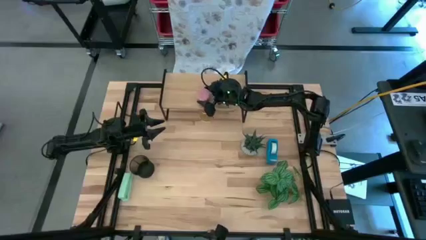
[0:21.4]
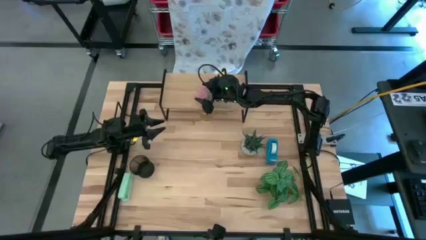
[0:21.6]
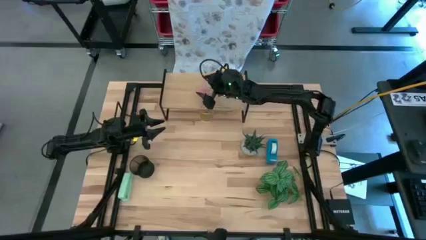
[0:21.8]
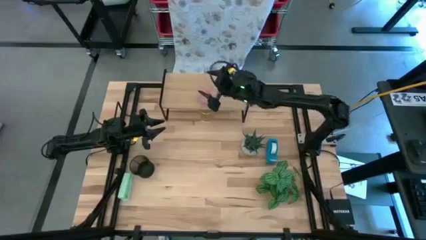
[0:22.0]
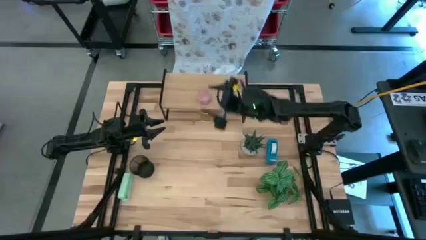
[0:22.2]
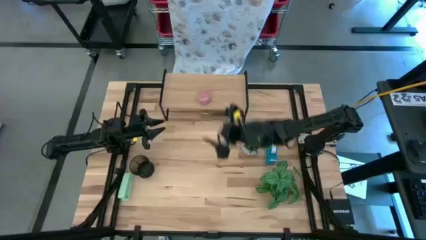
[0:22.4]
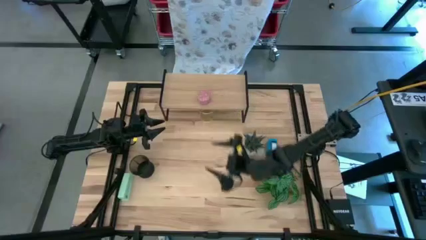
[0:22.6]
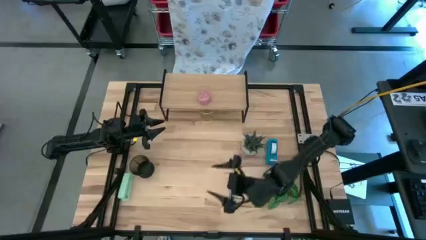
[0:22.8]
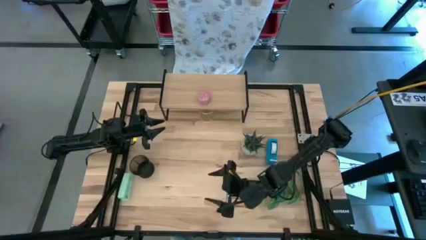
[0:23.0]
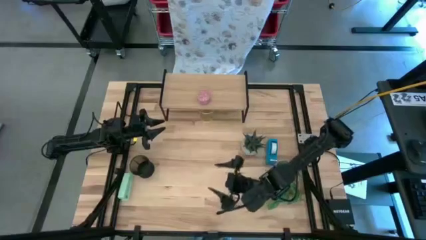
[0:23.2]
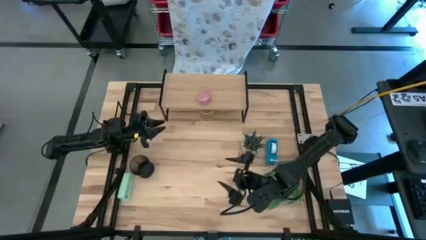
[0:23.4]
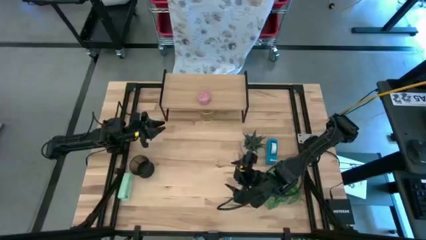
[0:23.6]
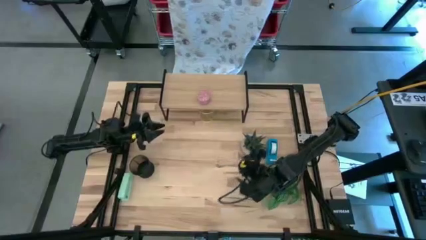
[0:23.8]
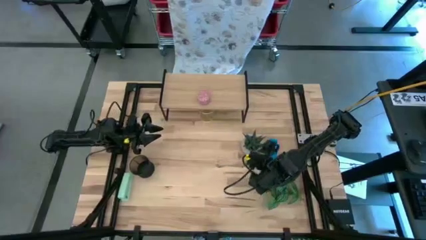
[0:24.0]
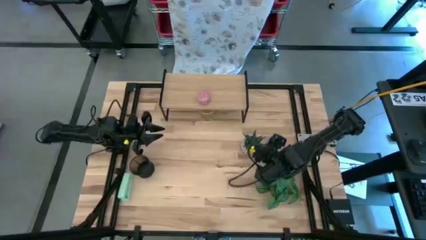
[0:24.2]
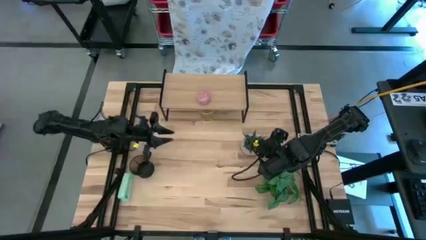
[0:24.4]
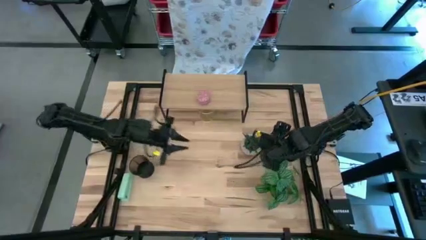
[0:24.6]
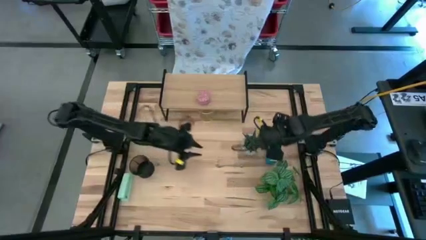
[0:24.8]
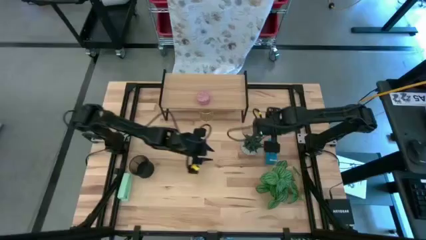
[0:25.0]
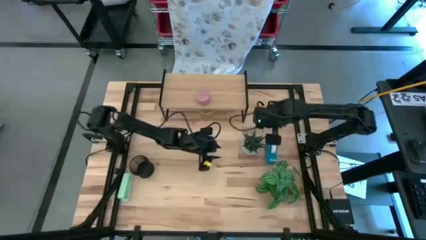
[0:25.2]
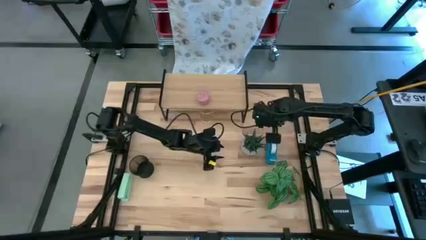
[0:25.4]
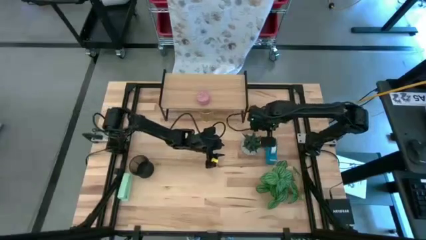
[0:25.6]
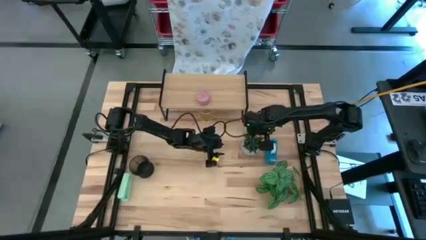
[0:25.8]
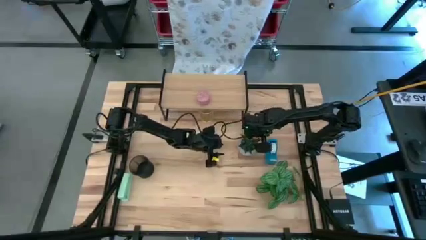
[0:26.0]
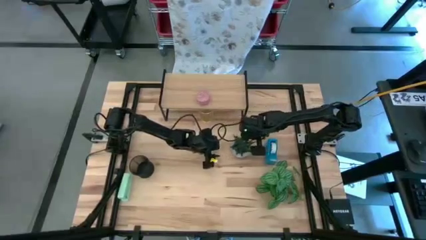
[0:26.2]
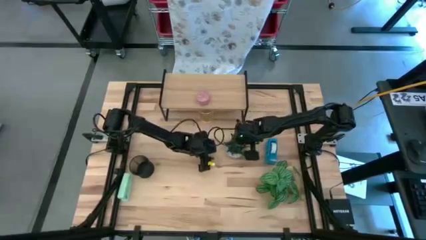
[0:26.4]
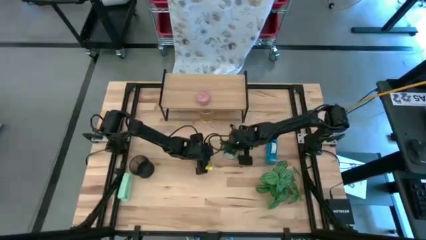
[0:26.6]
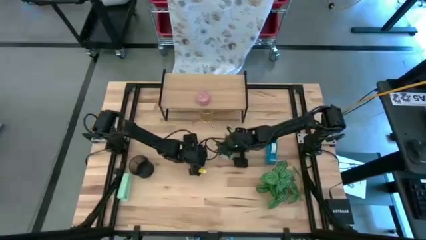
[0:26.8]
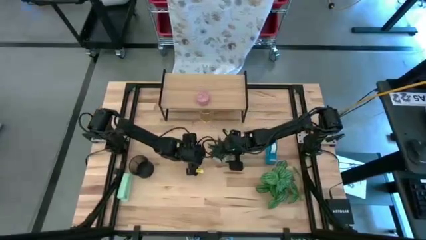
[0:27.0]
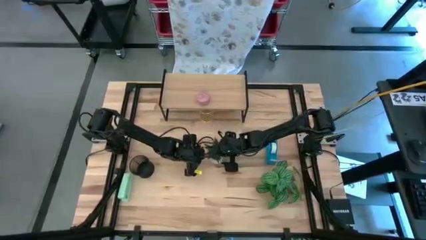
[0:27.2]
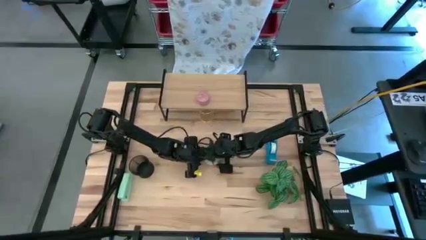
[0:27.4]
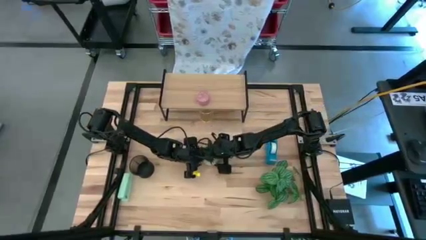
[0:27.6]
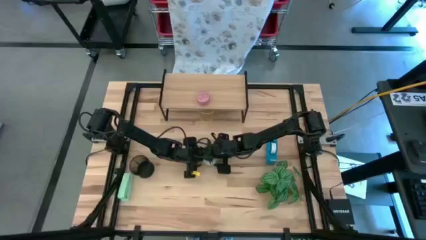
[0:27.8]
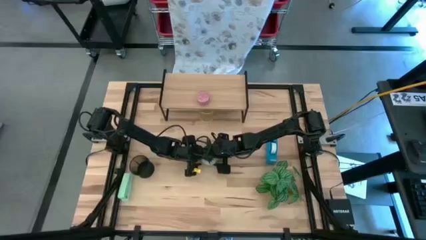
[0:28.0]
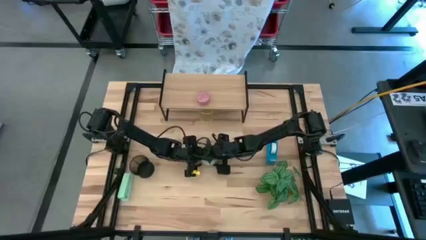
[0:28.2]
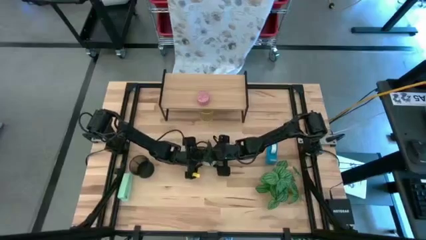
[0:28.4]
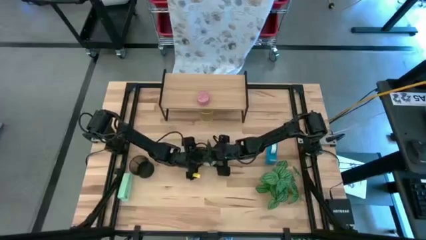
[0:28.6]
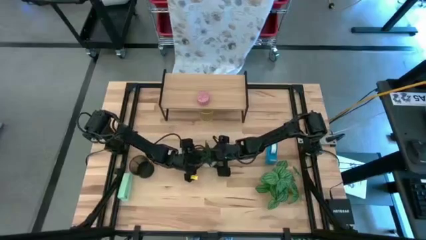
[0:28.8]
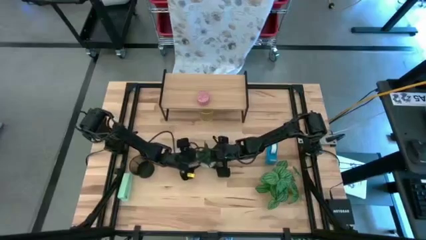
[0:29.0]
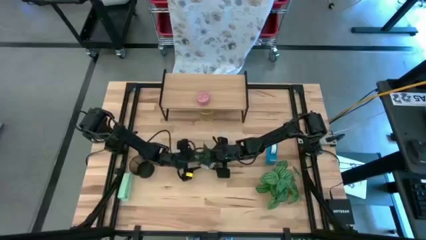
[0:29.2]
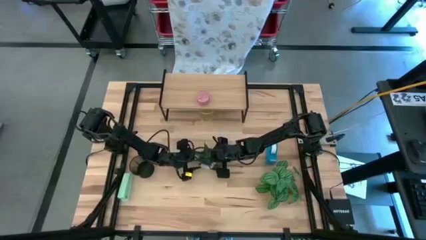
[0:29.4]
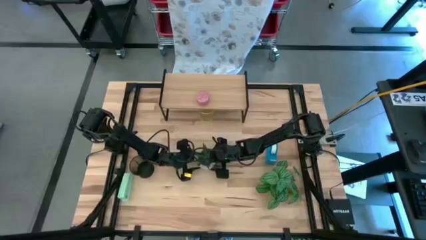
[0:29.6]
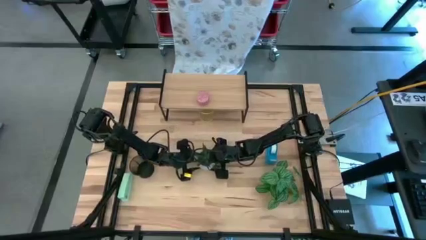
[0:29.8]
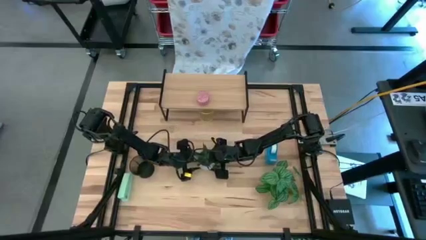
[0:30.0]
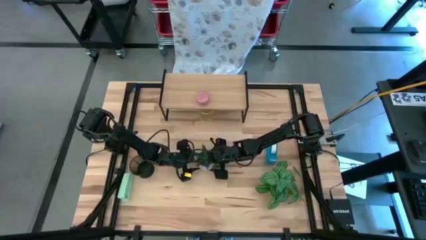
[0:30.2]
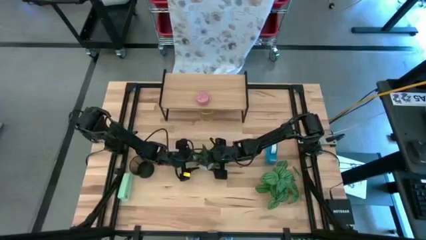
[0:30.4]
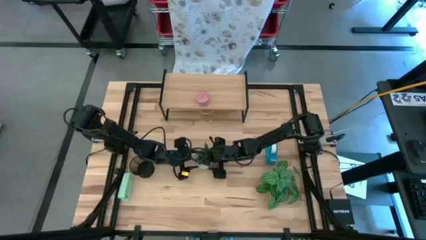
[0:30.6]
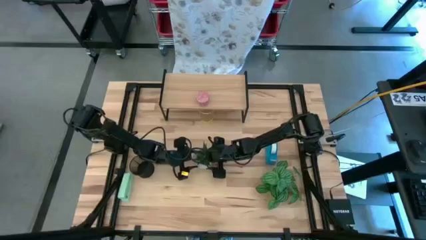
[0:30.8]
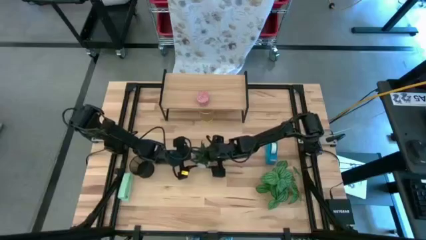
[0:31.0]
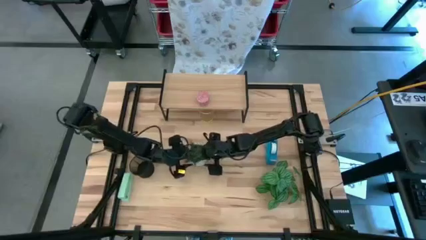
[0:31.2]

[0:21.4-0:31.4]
Task: Stock shelves
Put the top potted plant on the shelf

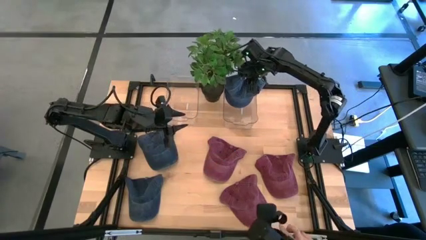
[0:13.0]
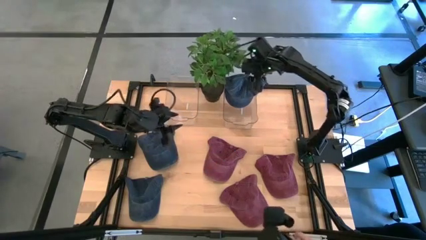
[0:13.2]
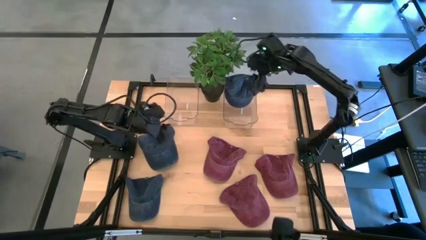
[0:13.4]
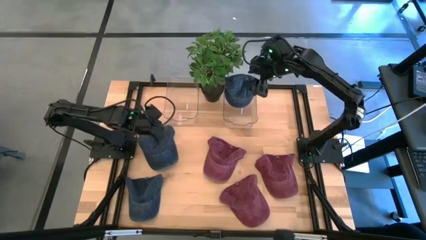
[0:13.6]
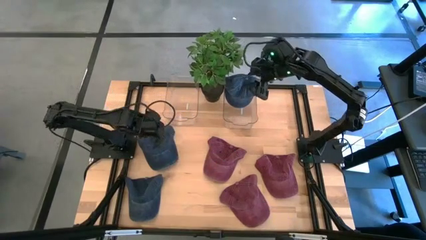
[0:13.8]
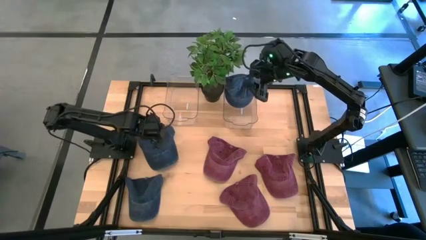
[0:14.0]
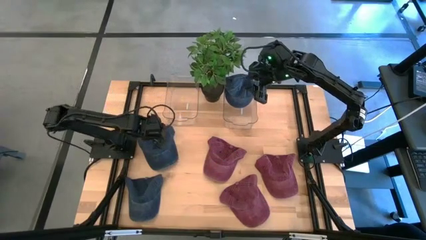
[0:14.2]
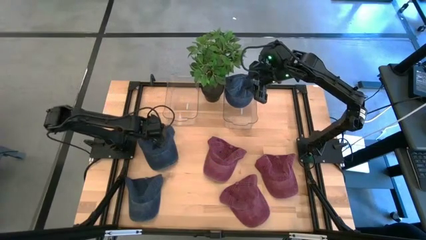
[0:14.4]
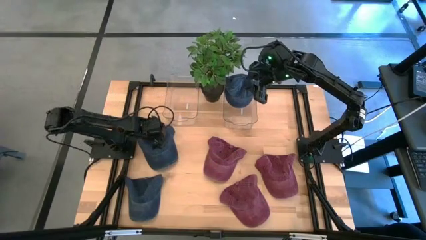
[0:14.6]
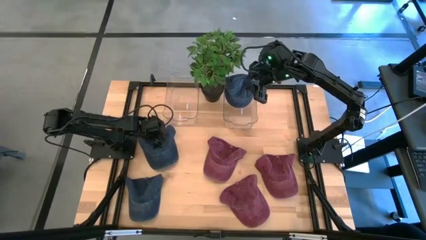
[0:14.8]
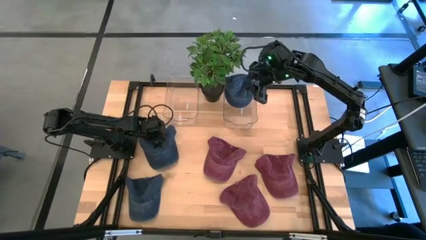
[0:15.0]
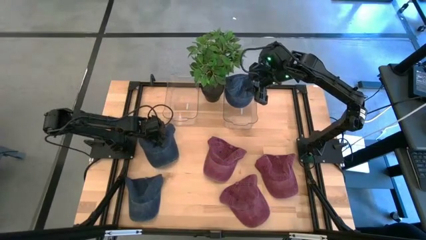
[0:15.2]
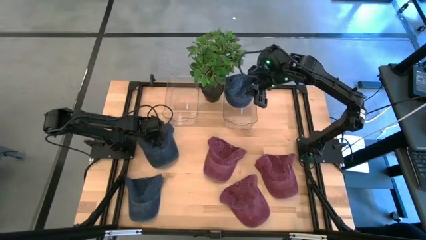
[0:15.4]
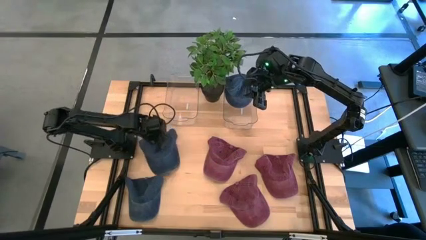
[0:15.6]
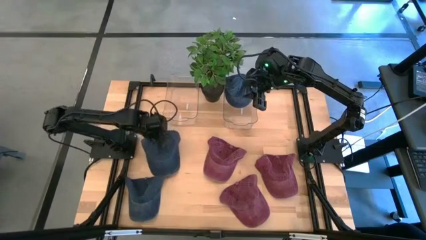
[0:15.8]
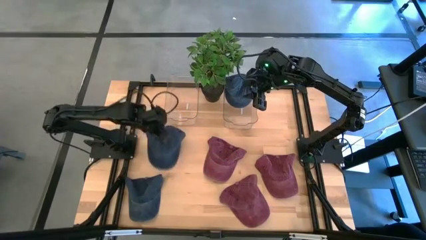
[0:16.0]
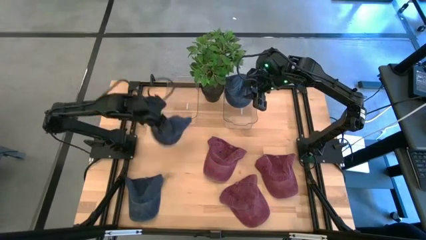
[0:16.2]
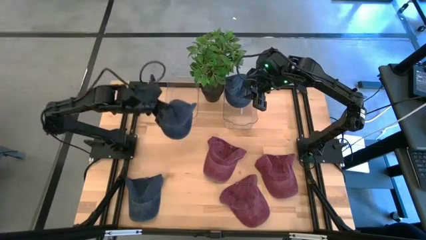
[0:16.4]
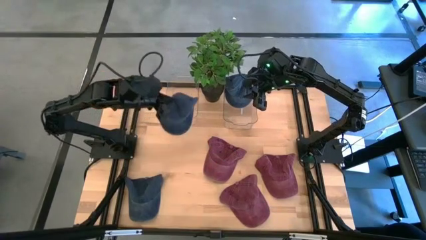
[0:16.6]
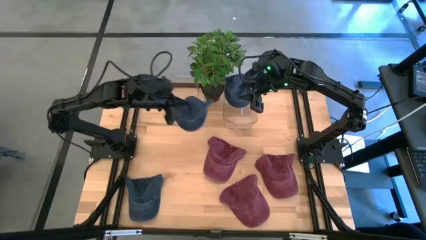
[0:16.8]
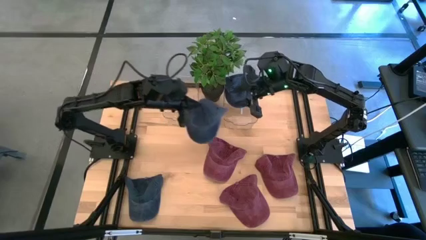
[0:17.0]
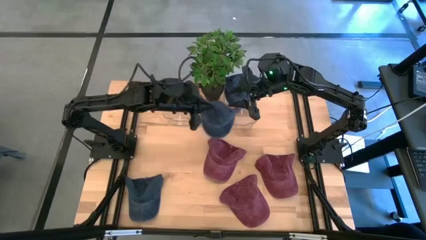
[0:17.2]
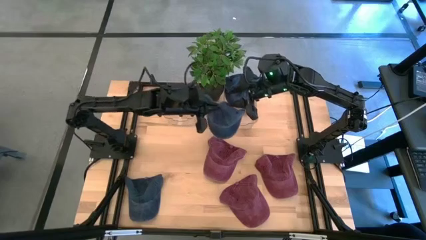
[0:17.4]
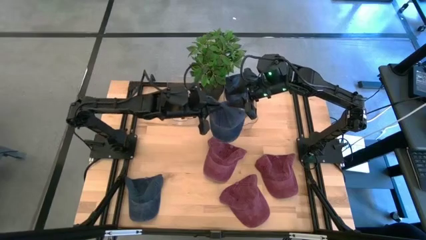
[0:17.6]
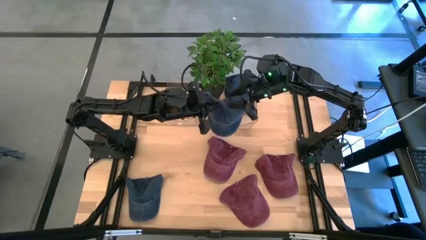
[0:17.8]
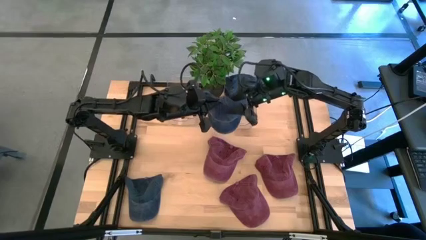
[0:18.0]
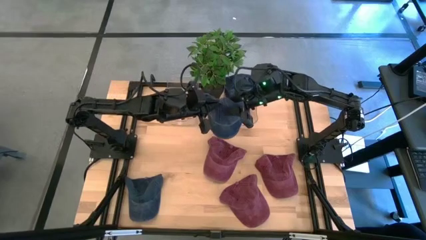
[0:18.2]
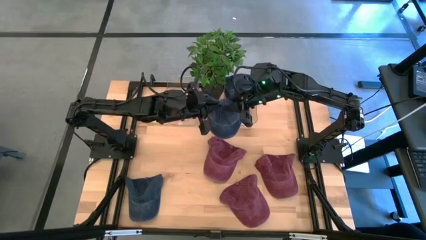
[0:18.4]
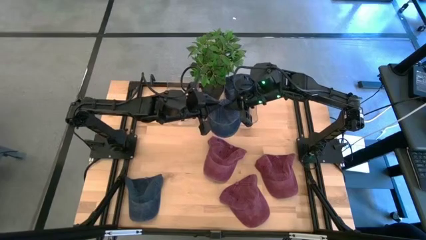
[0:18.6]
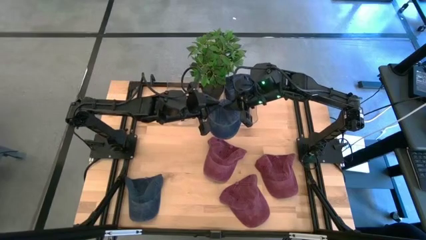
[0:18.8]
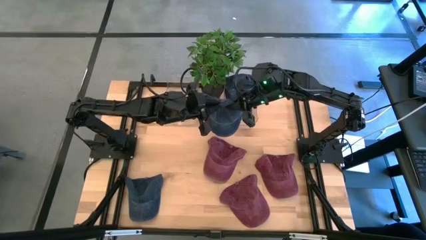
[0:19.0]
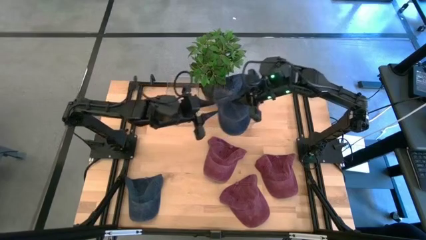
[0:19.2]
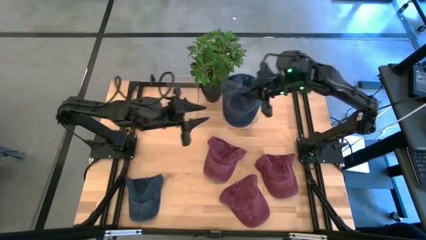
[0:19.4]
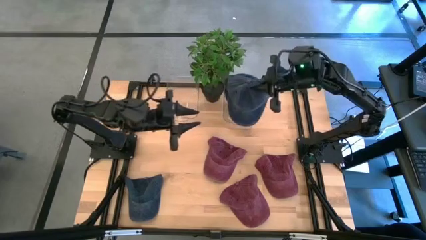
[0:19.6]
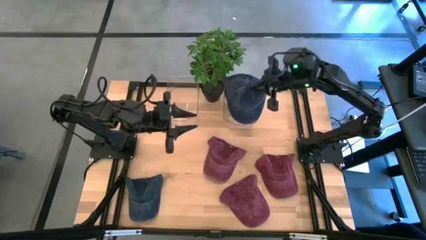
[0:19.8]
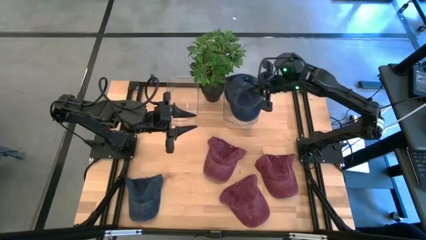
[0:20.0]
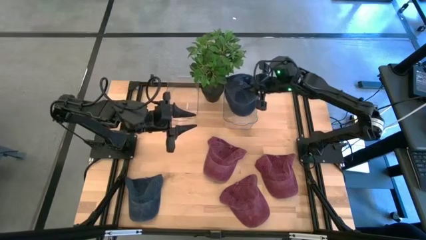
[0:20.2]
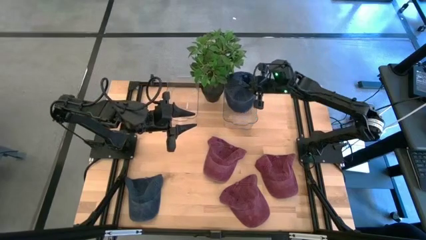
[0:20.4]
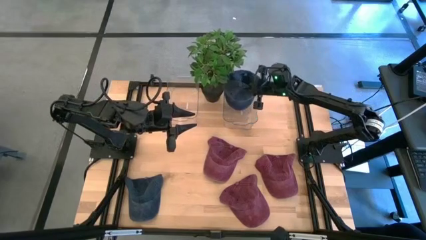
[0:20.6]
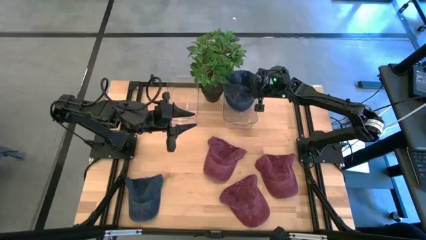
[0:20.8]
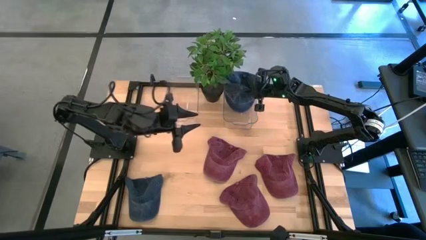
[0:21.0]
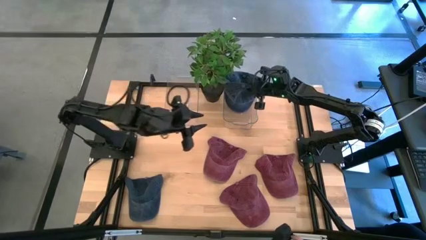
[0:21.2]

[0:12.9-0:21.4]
Task: Pick & Place hat
Put the top blue cap into the right transparent bin
